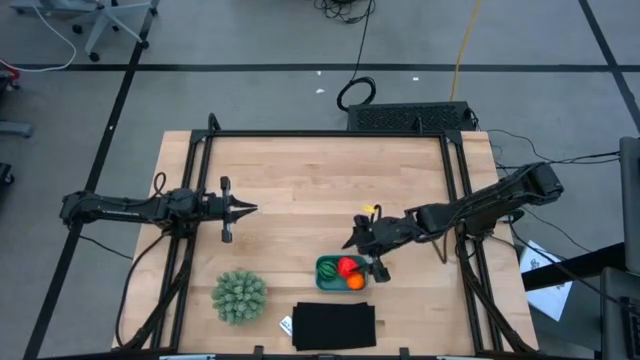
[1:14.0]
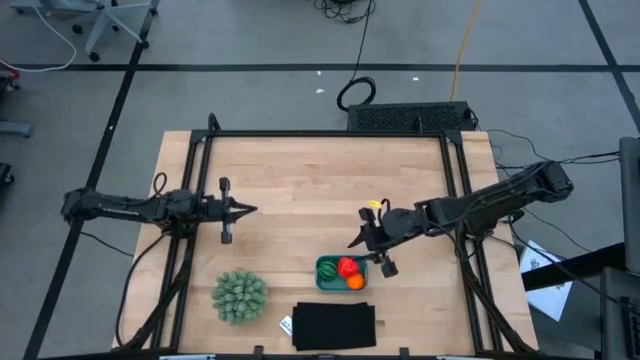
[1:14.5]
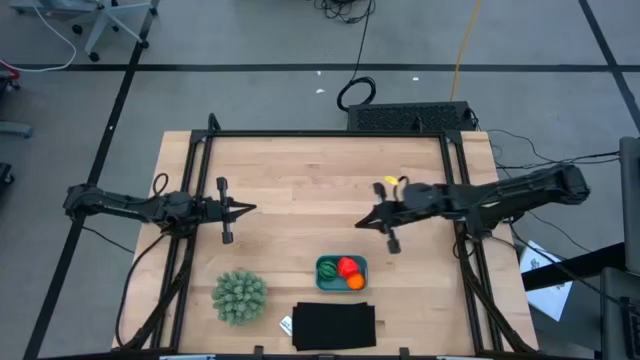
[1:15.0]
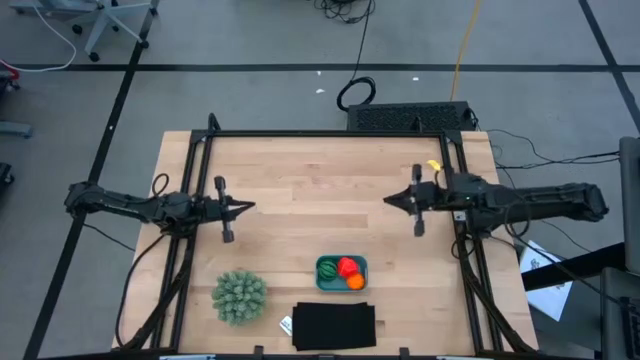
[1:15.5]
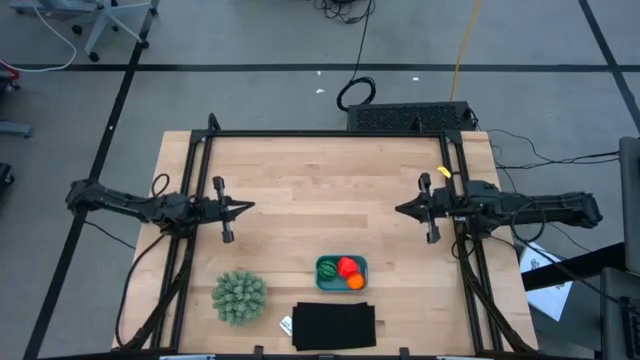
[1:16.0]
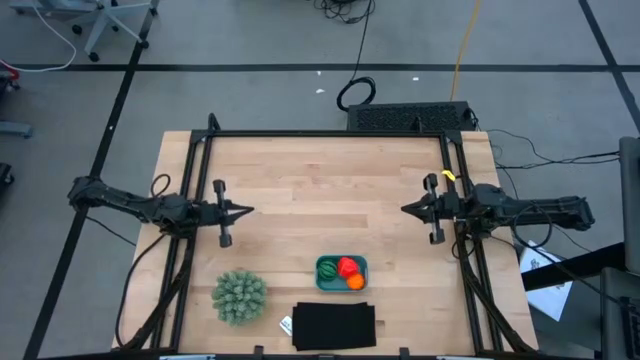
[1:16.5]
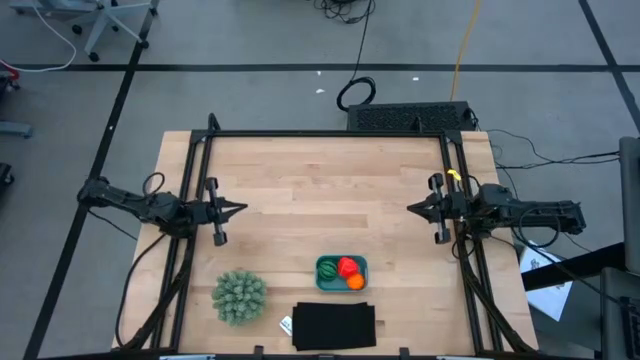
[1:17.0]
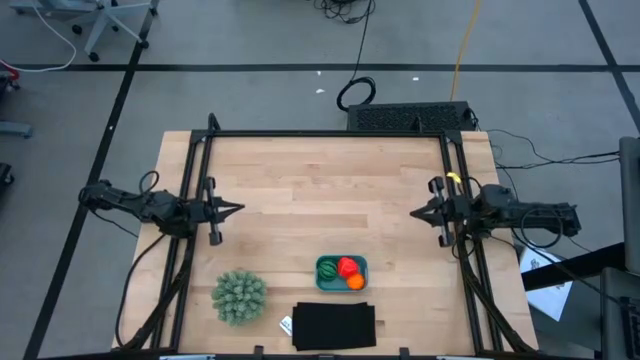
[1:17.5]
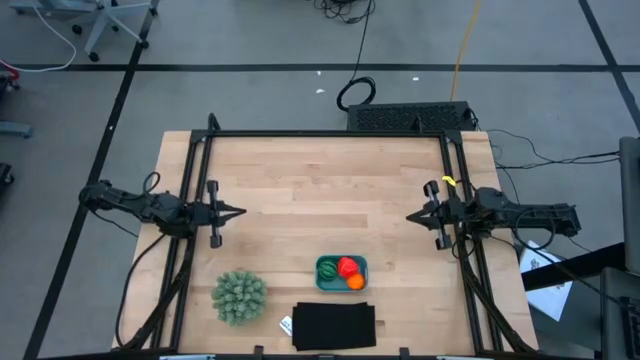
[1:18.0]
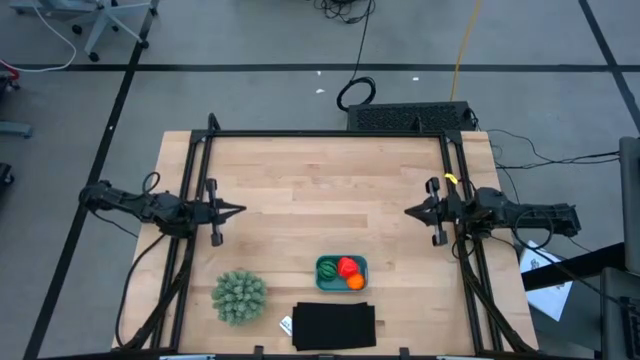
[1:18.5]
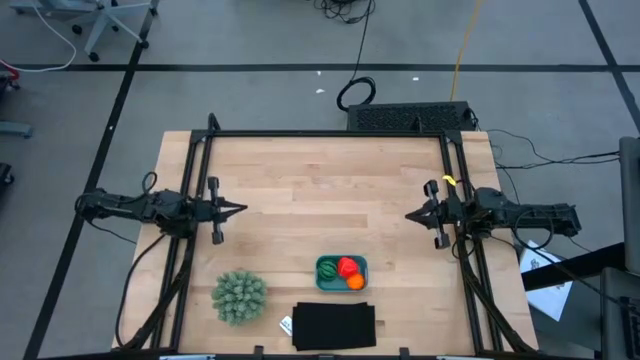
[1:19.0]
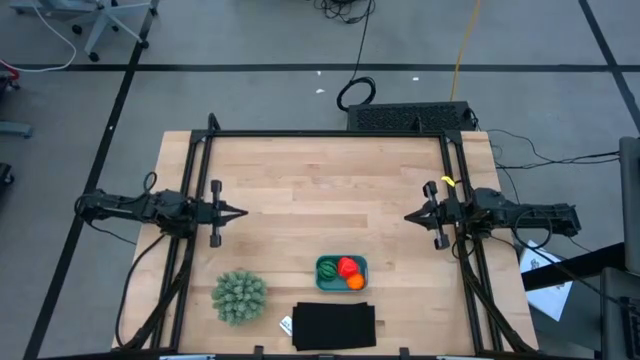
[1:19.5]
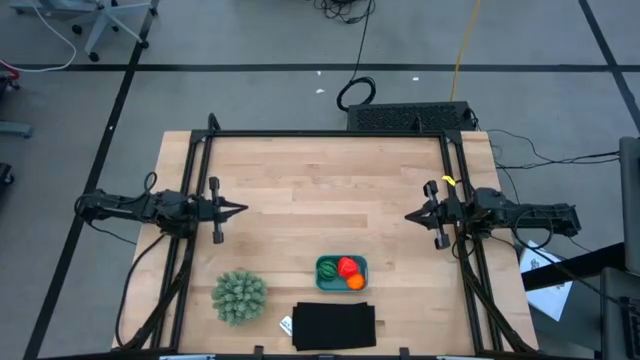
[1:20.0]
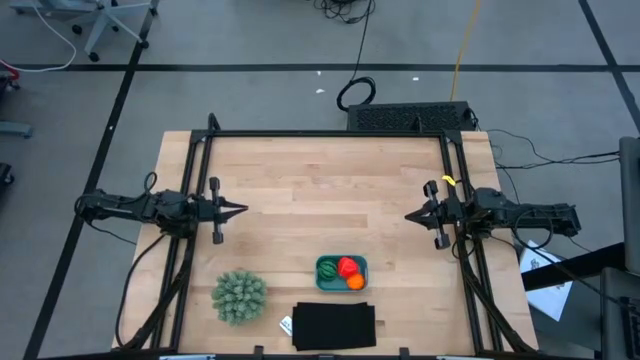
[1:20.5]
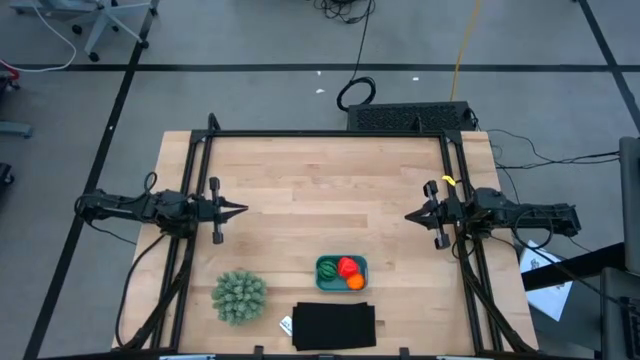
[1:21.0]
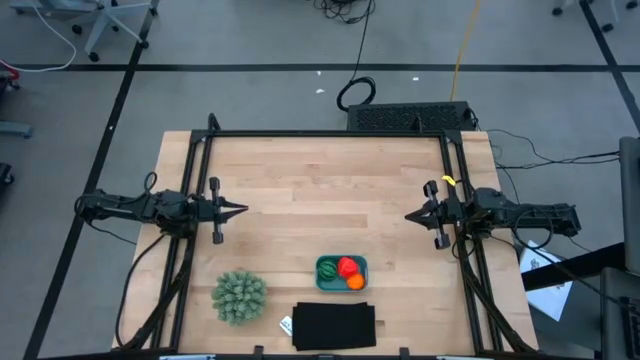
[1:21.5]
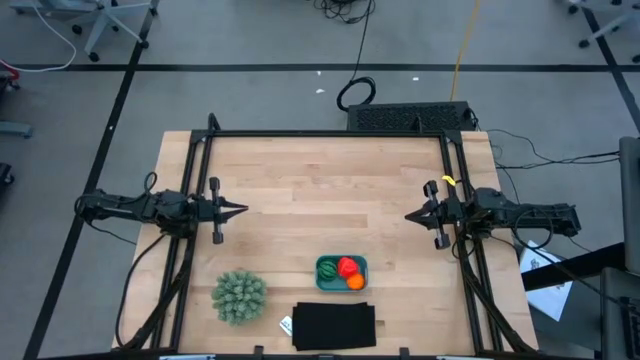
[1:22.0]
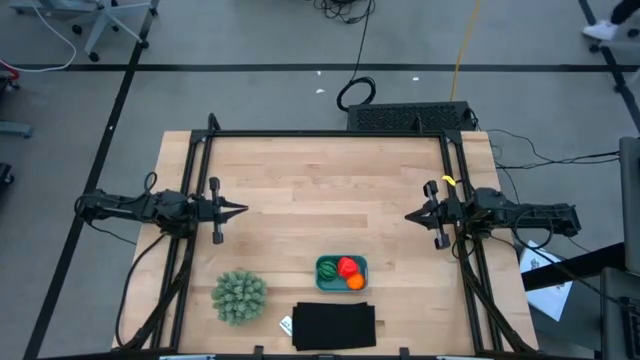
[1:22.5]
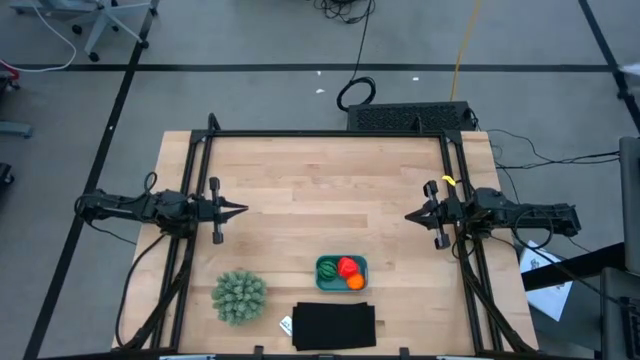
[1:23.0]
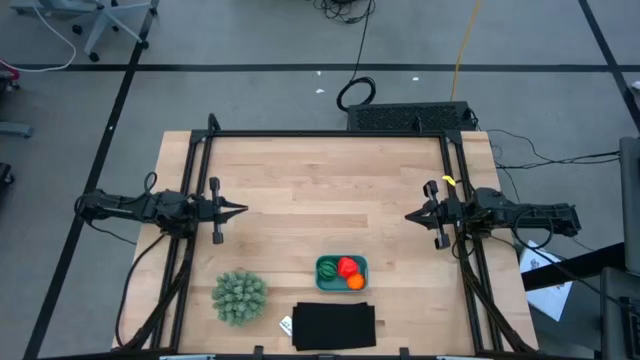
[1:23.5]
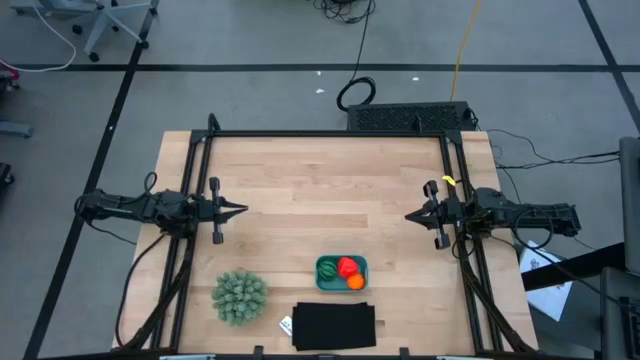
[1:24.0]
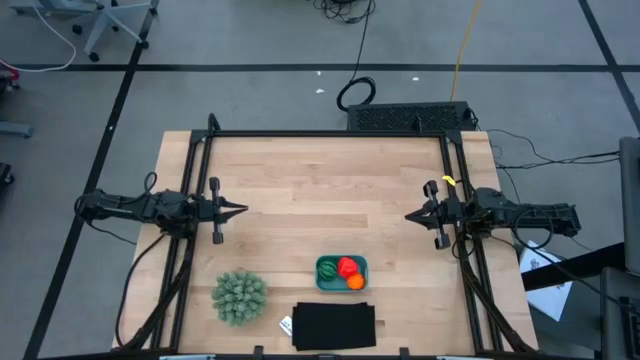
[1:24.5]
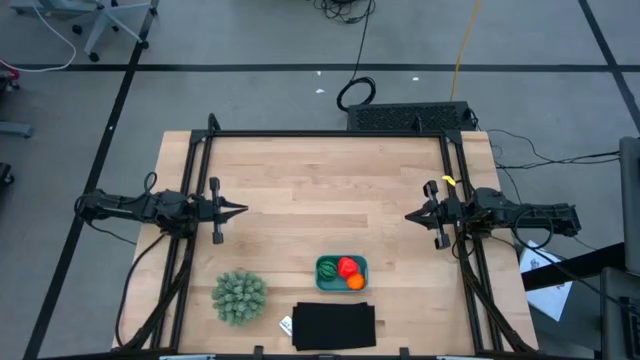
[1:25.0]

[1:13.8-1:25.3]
Task: Pick and placing Produce into tupperware
Return to Home Position

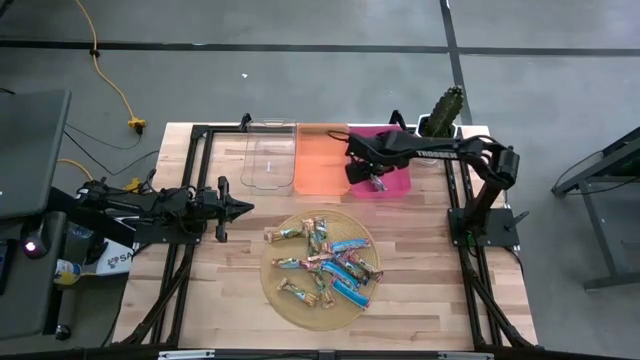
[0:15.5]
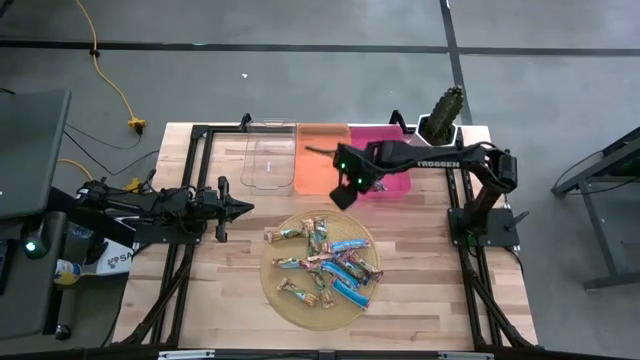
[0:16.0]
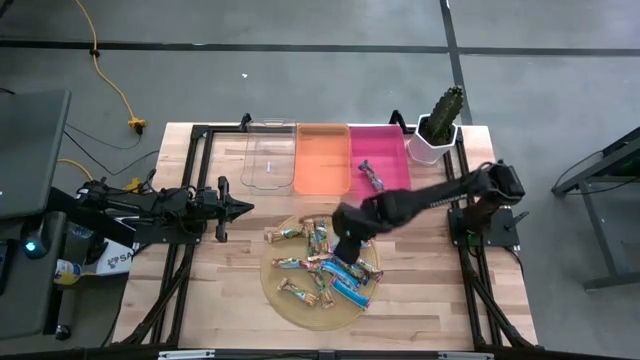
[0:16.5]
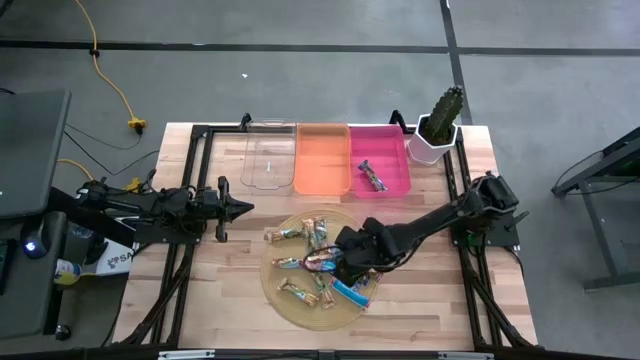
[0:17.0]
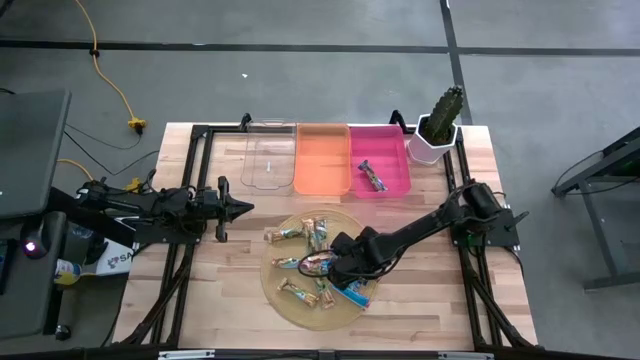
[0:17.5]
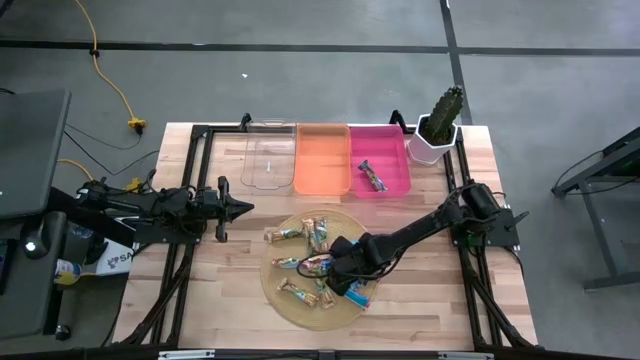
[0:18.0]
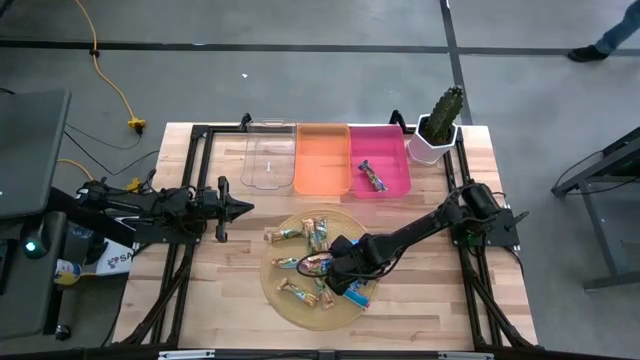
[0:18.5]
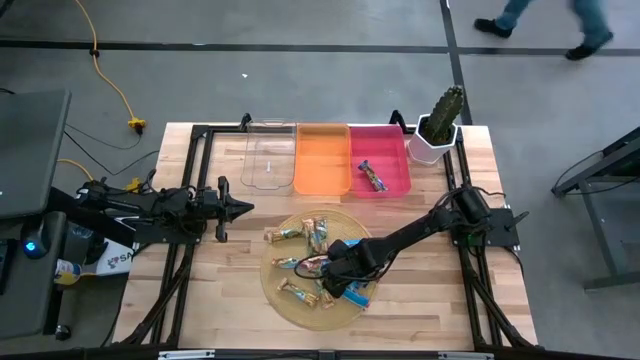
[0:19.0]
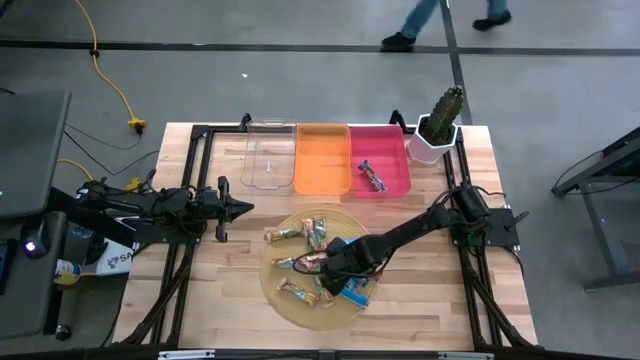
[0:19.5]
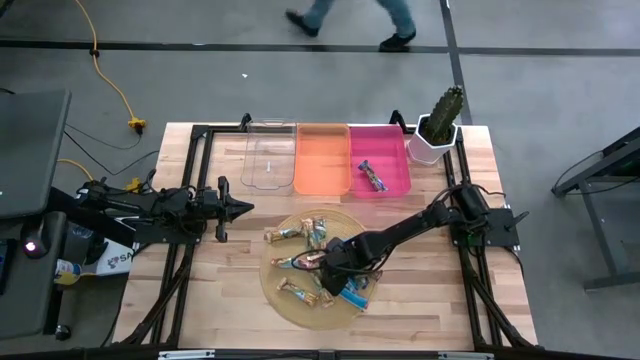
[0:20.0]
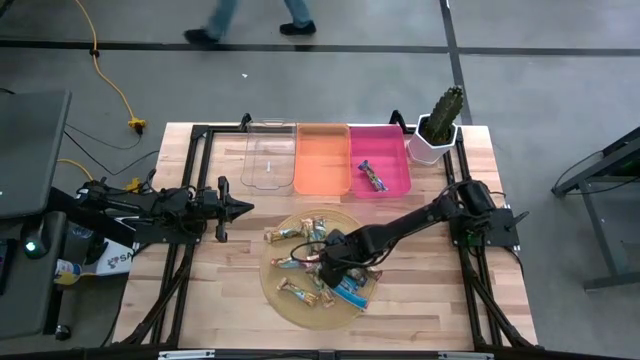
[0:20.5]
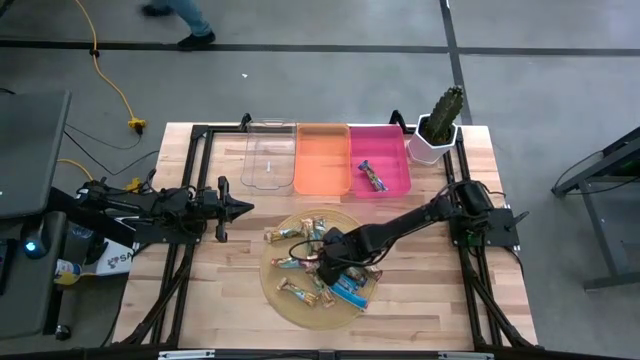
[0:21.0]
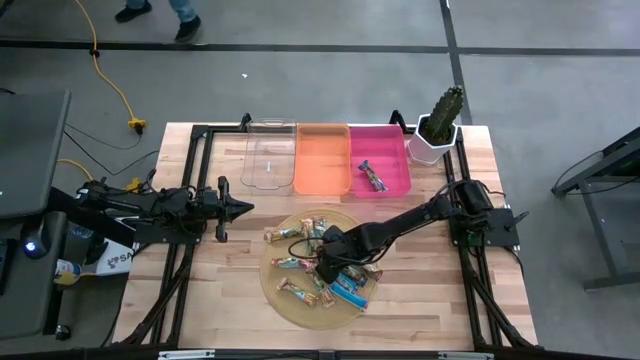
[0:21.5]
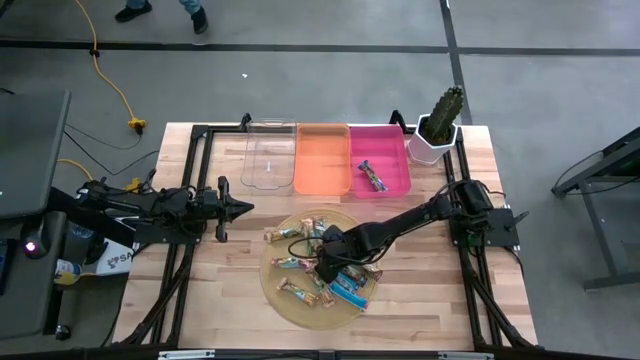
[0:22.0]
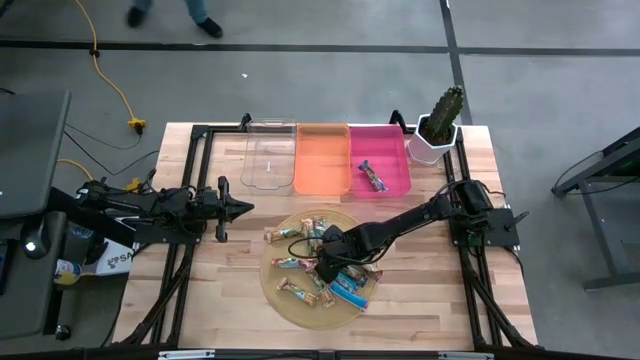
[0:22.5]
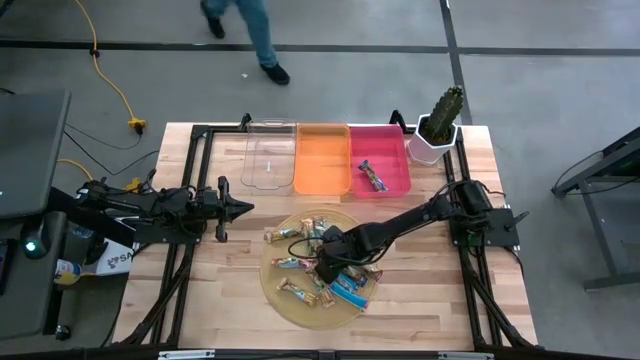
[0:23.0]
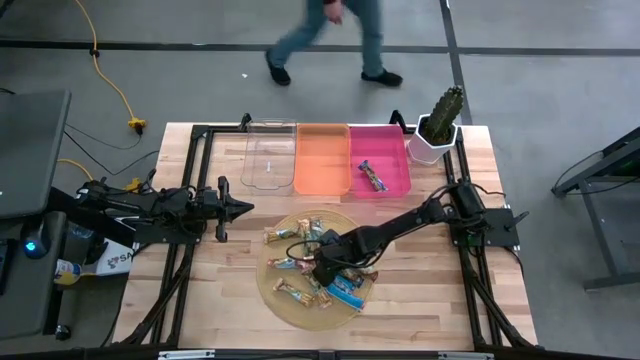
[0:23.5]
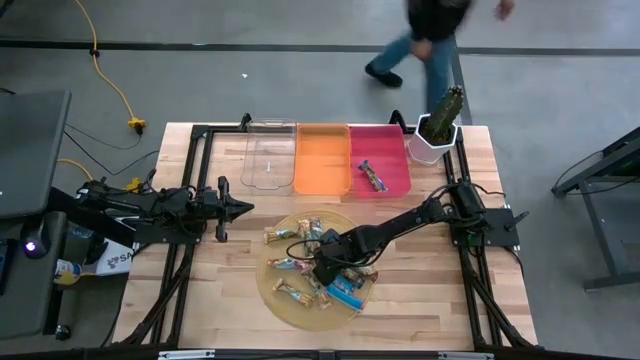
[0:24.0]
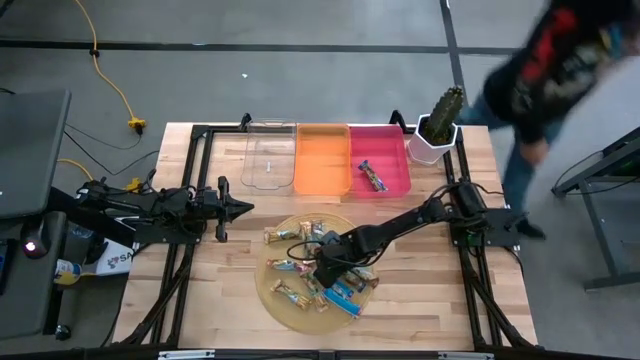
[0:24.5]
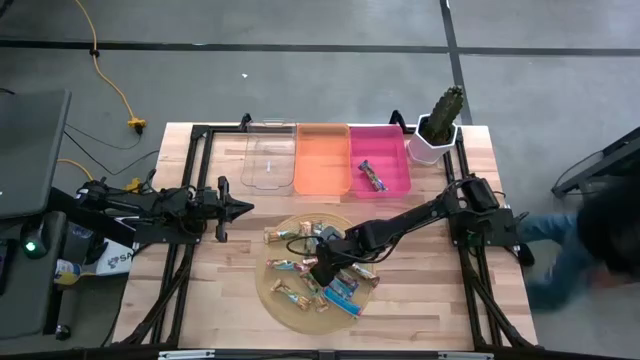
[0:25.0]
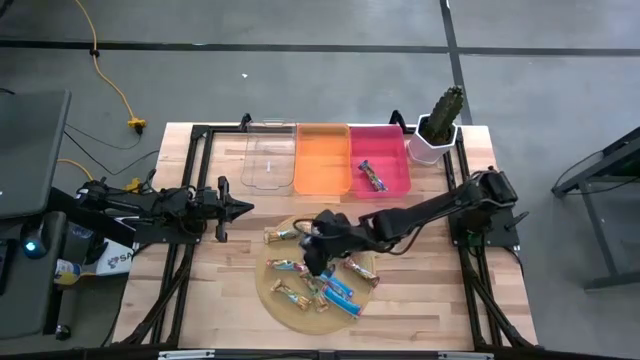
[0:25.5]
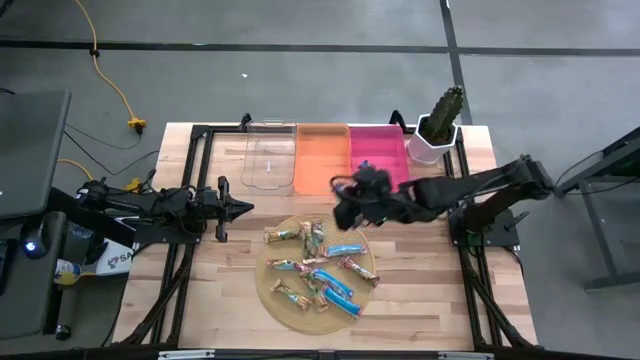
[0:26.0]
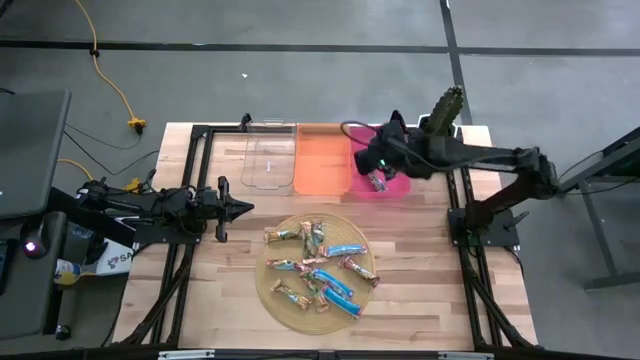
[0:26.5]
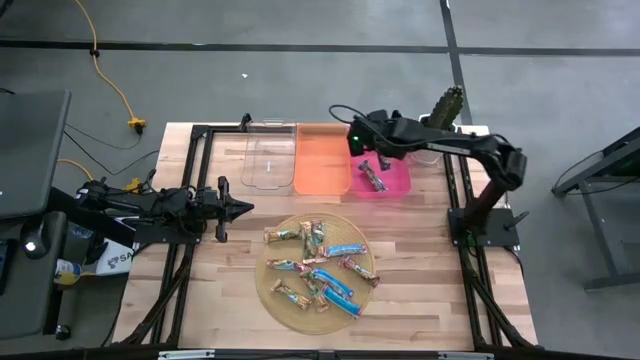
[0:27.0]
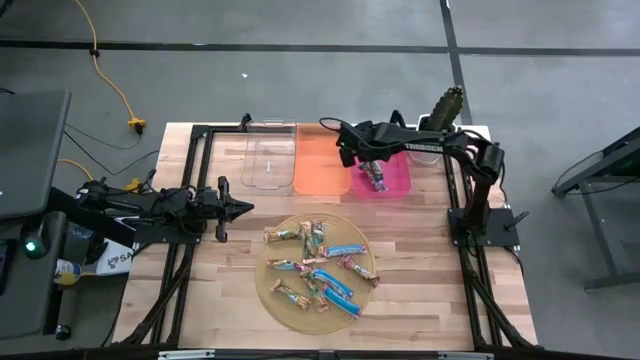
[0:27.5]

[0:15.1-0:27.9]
Task: Pick and place Granola Bars by type
Put the blue granola bar into the pink bin
